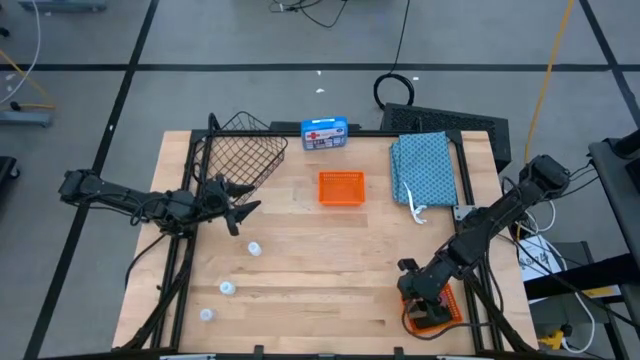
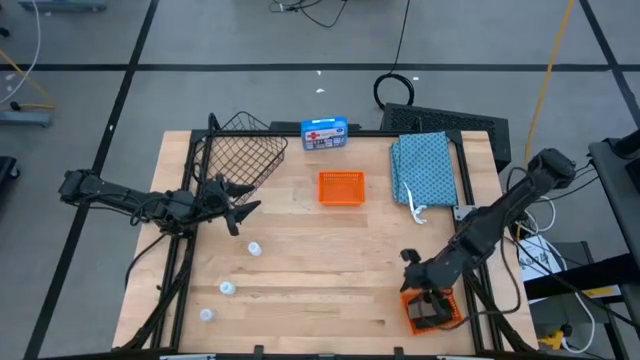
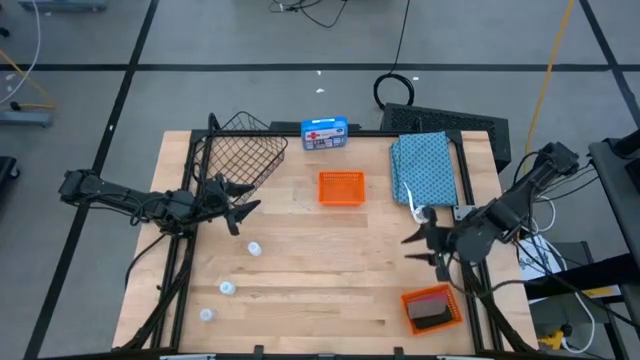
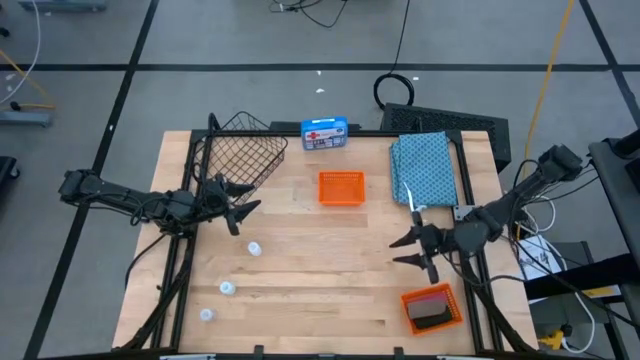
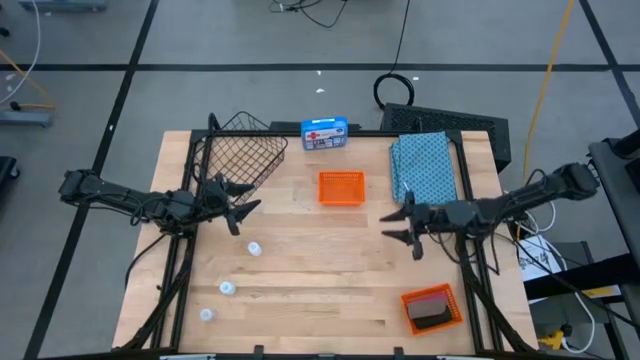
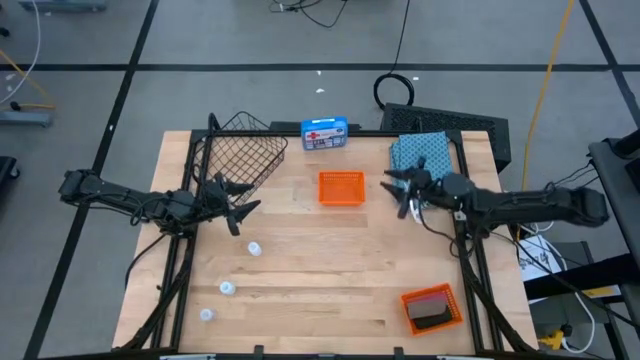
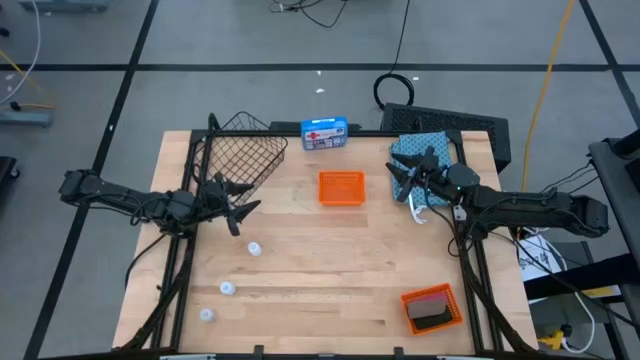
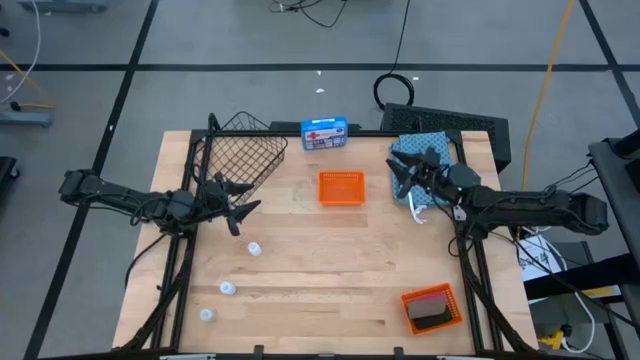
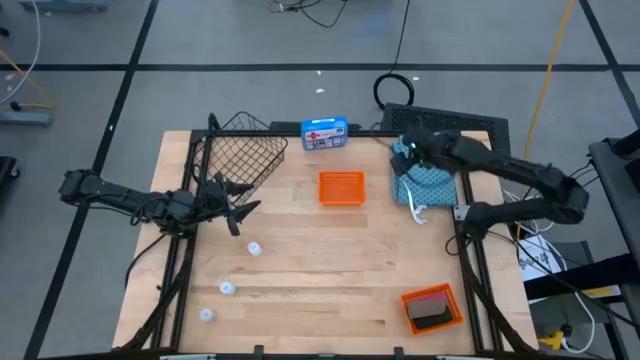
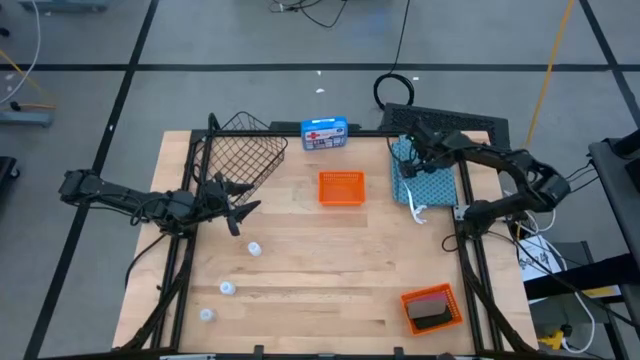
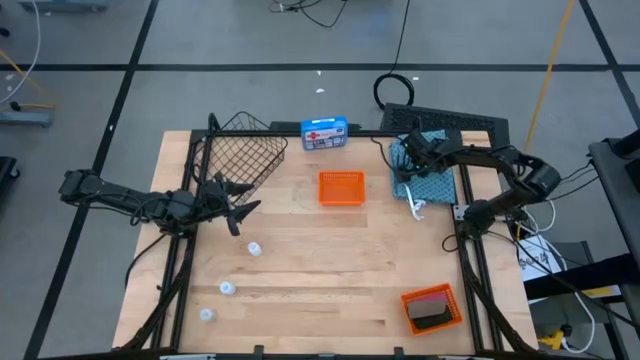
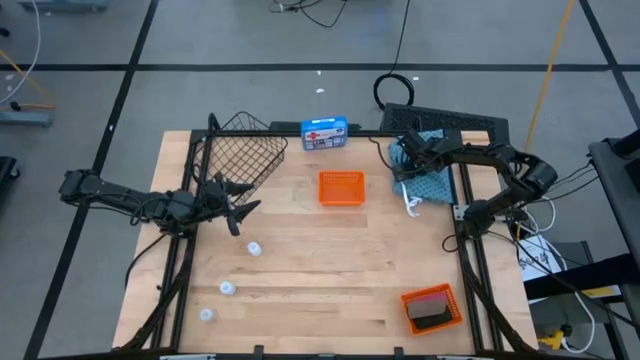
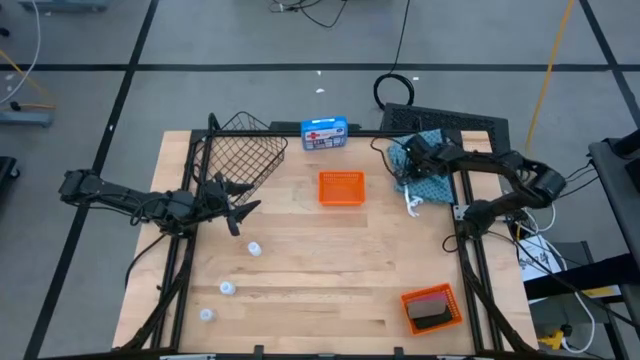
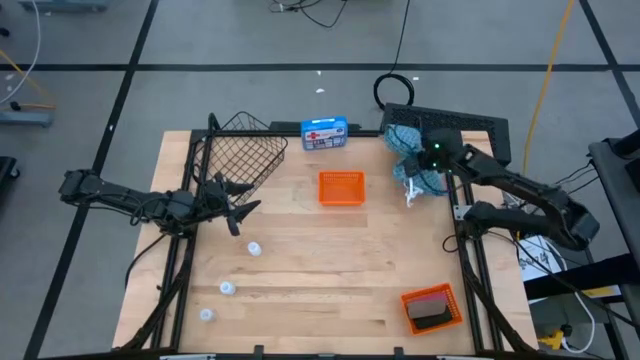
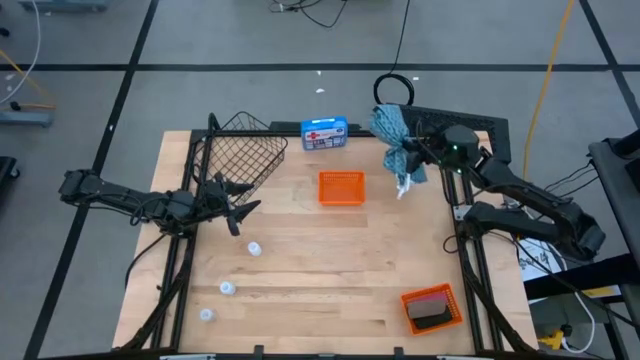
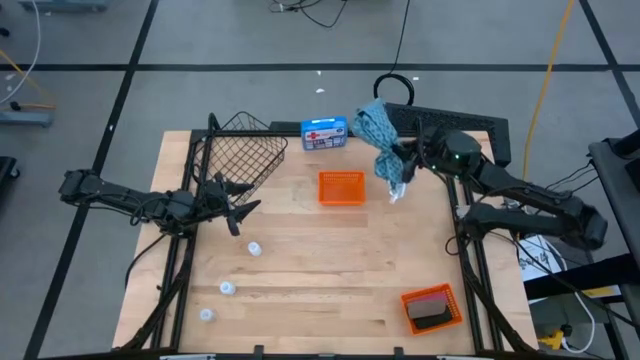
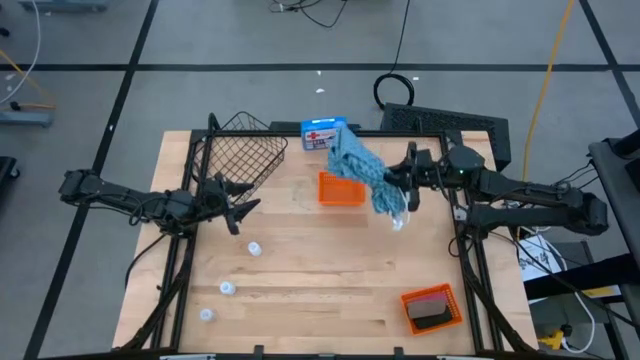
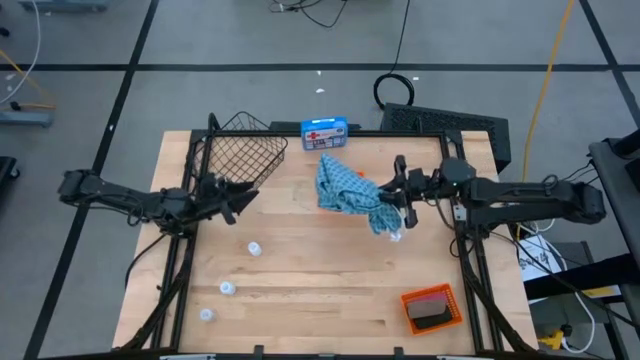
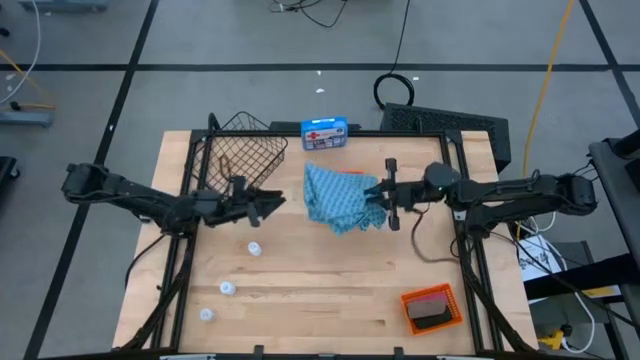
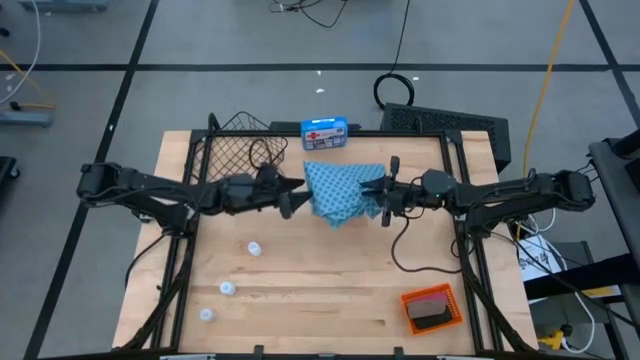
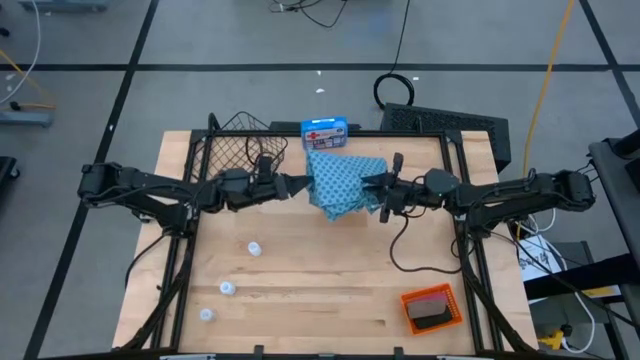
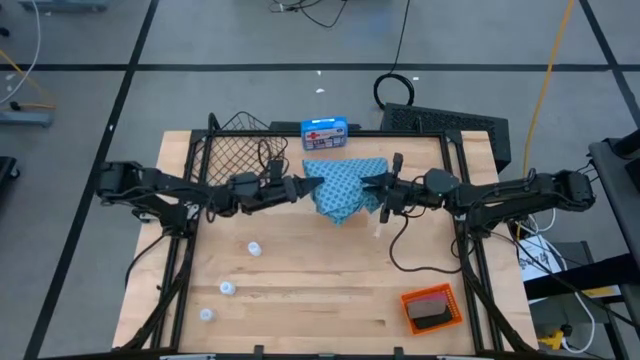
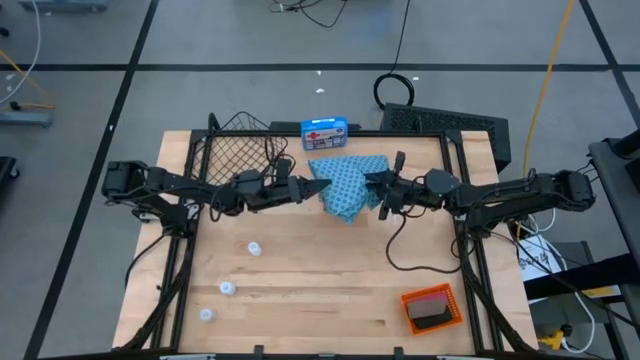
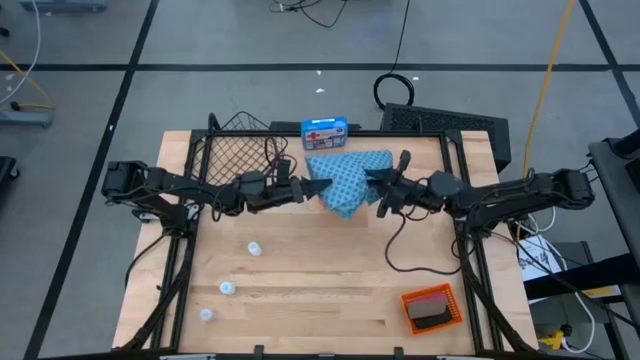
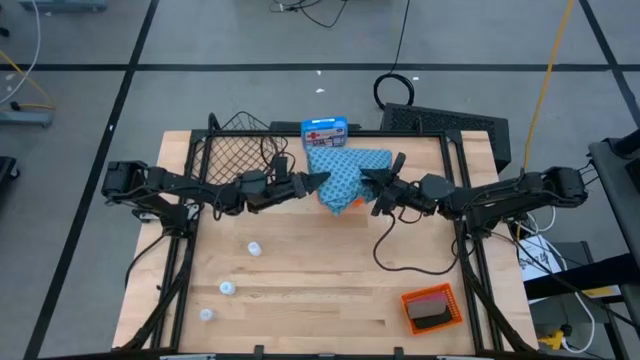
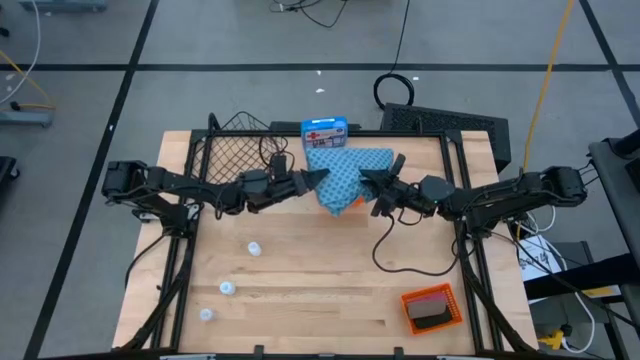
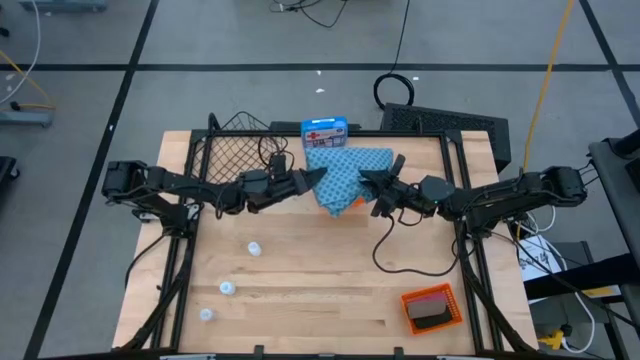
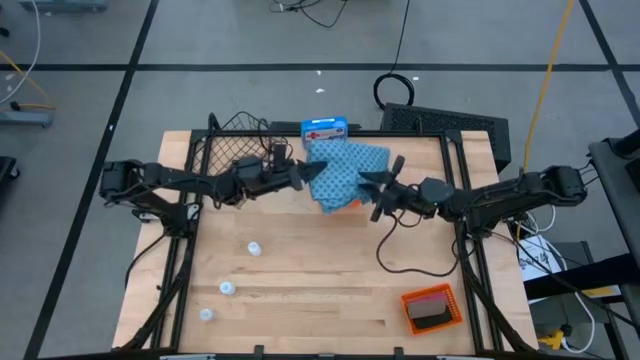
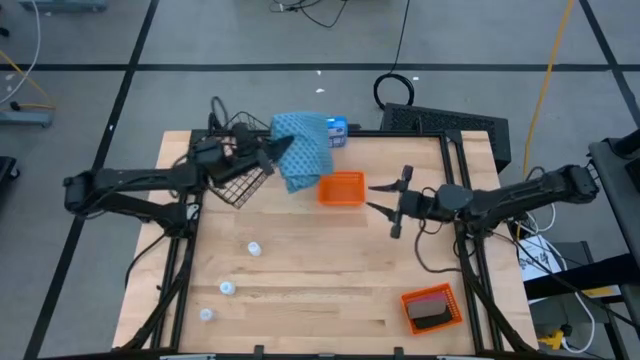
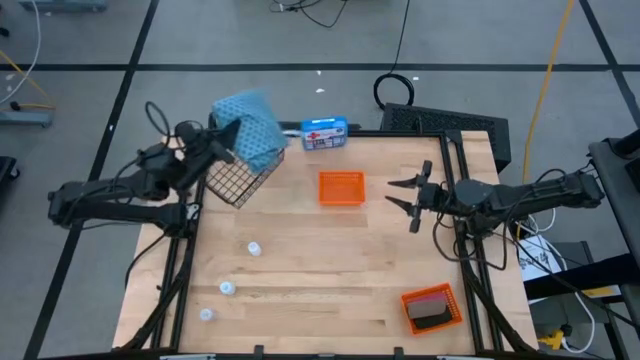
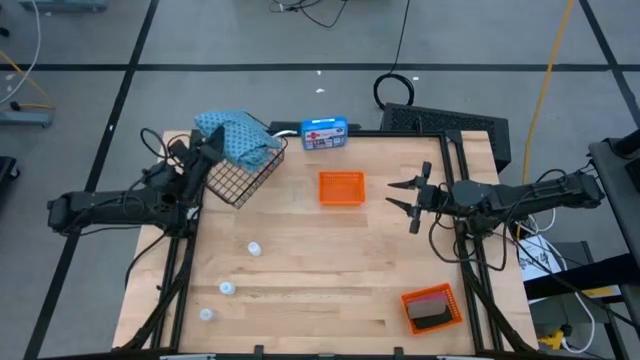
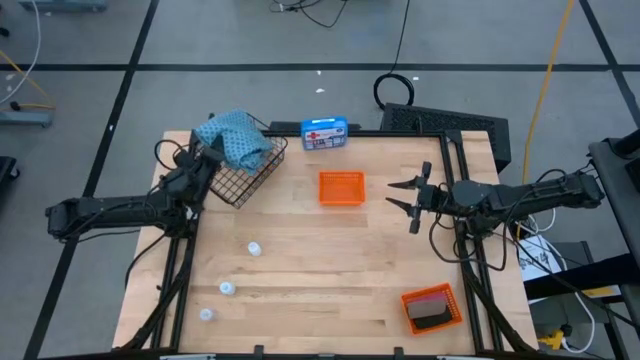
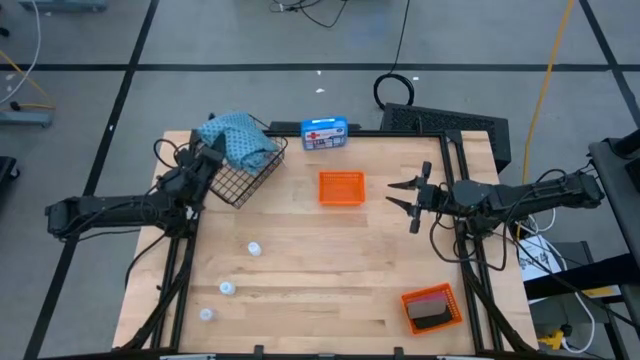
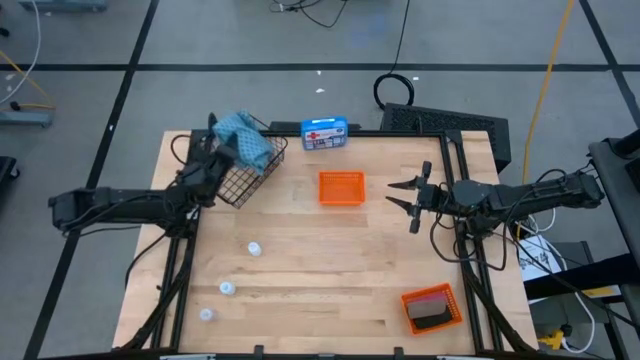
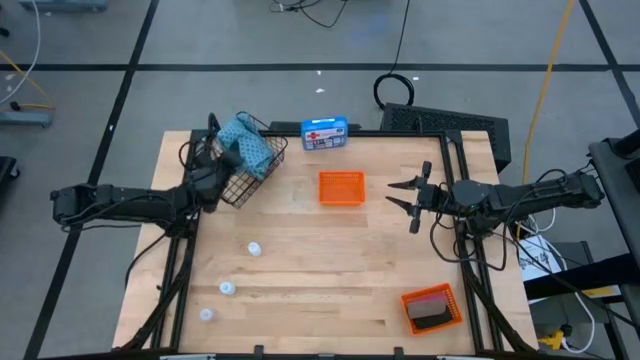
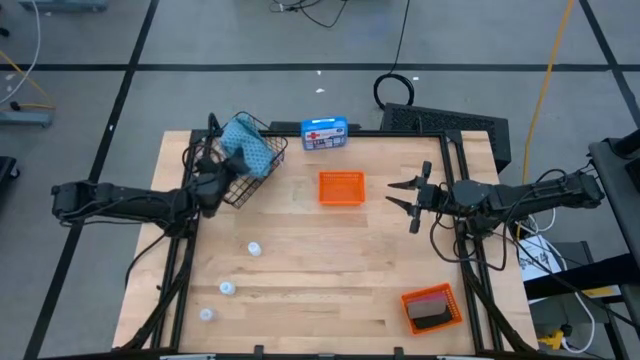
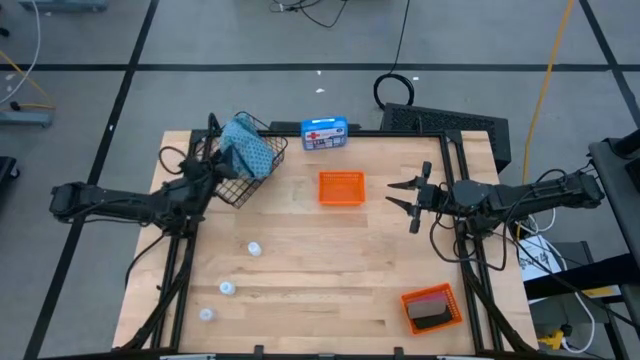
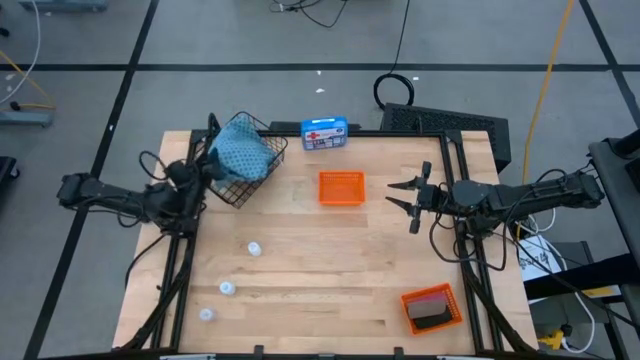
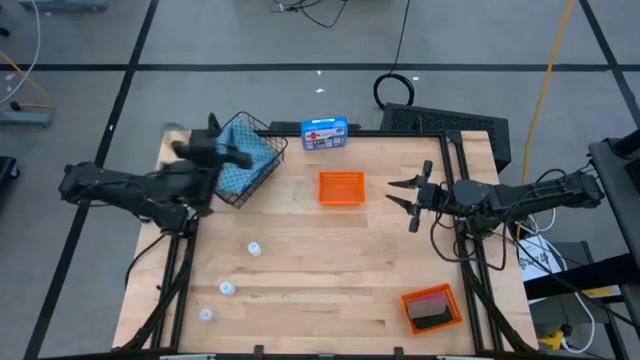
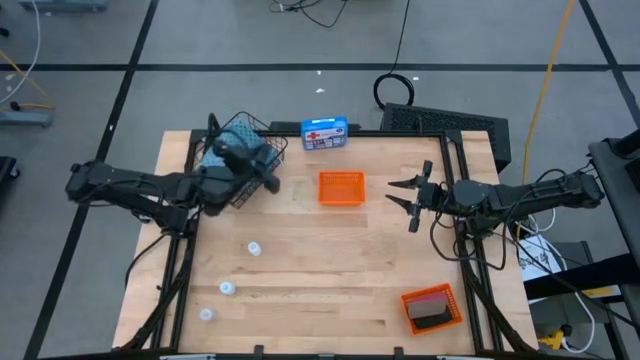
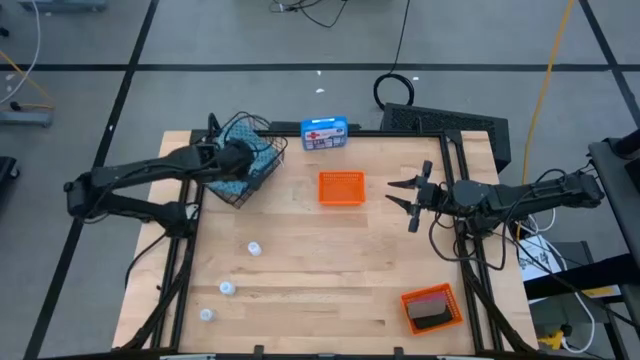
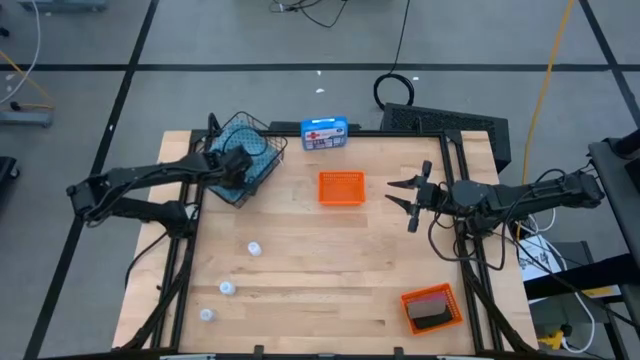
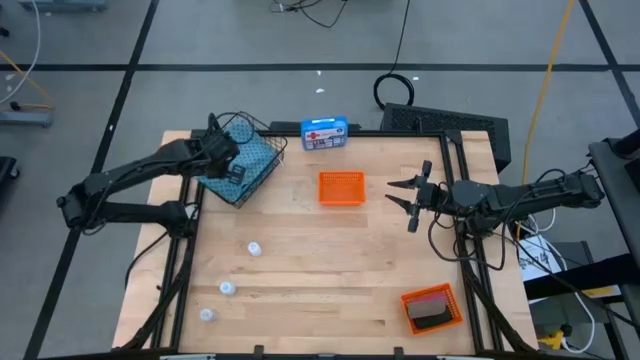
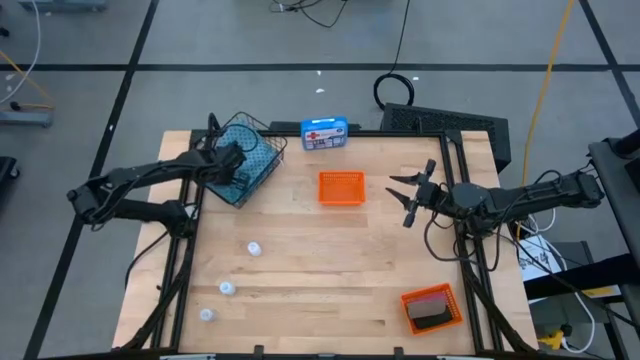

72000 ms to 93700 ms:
Task: Pick & place medical supplies in basket/bin
Put the blue patient gown into the black wire basket
